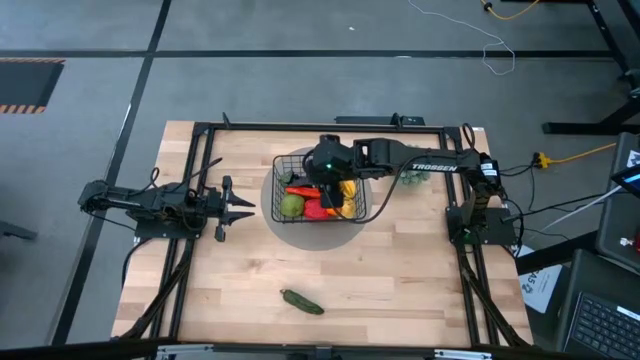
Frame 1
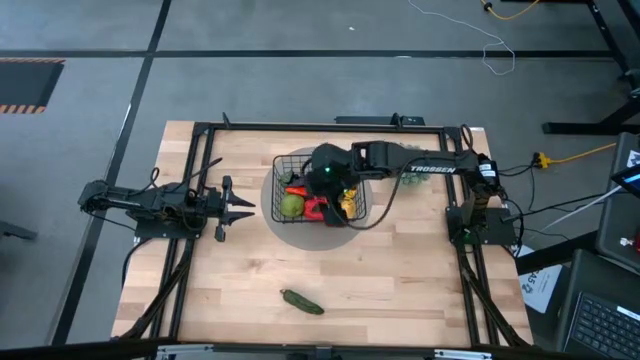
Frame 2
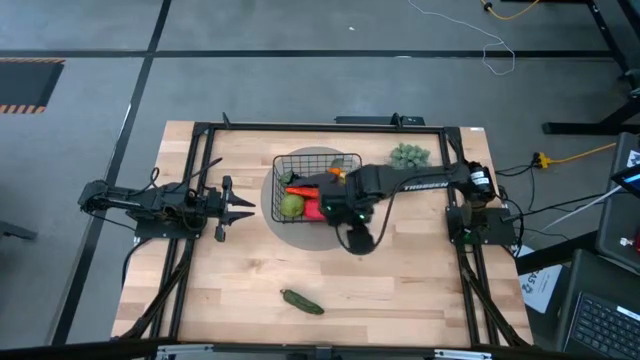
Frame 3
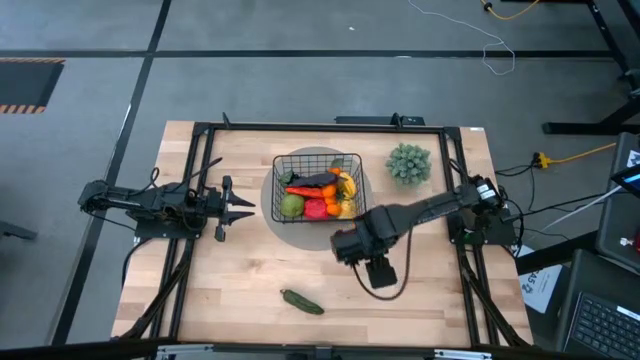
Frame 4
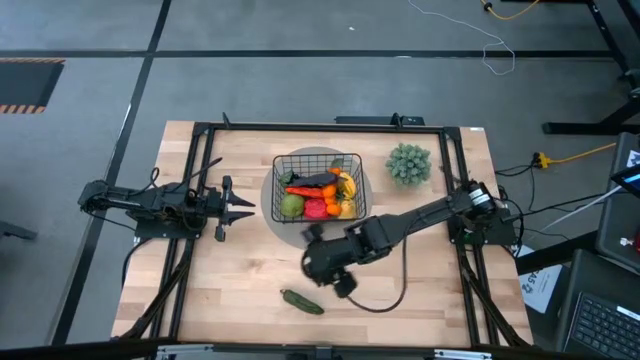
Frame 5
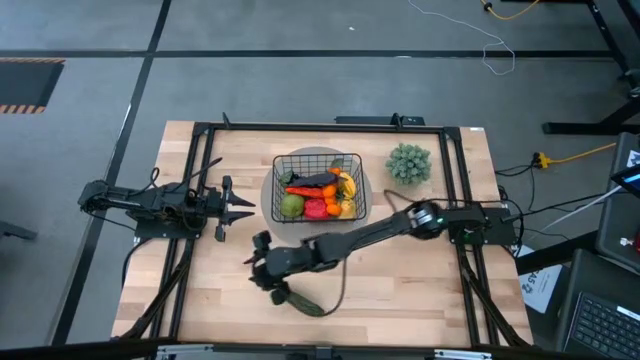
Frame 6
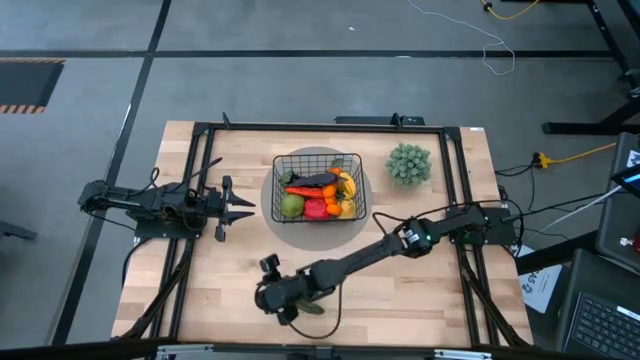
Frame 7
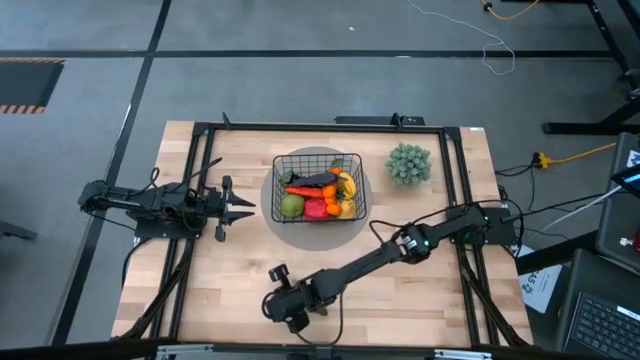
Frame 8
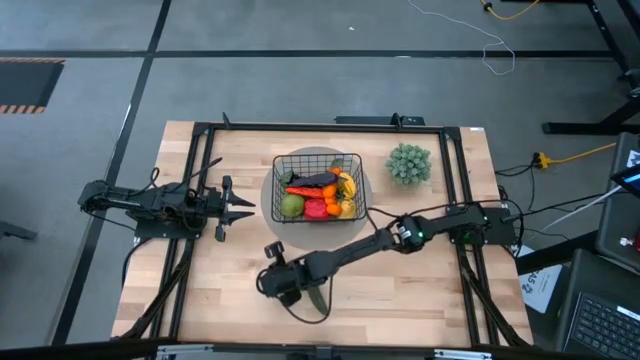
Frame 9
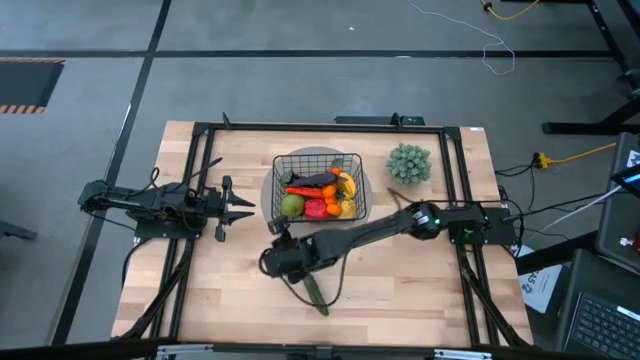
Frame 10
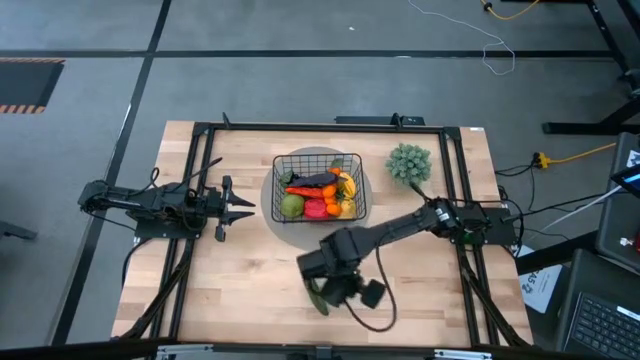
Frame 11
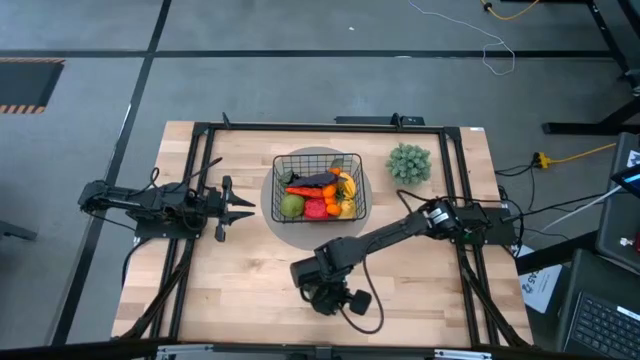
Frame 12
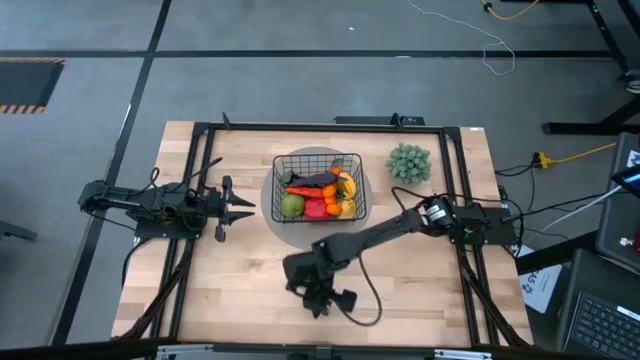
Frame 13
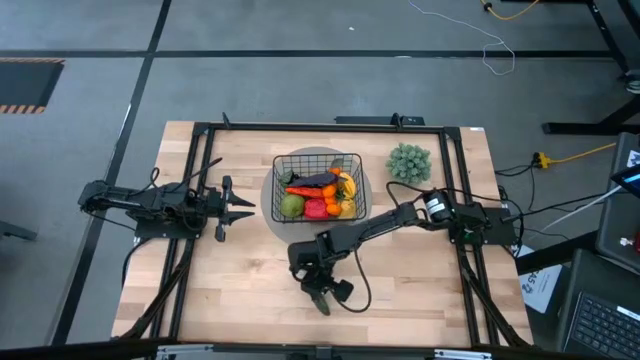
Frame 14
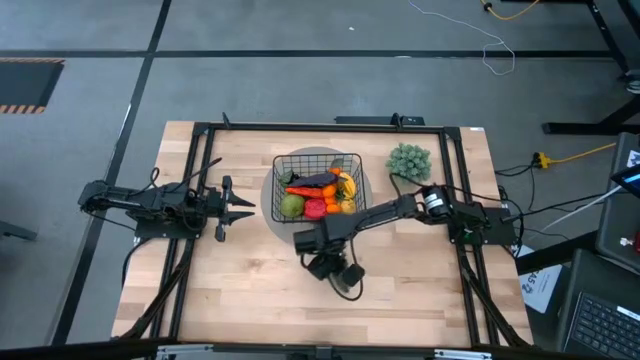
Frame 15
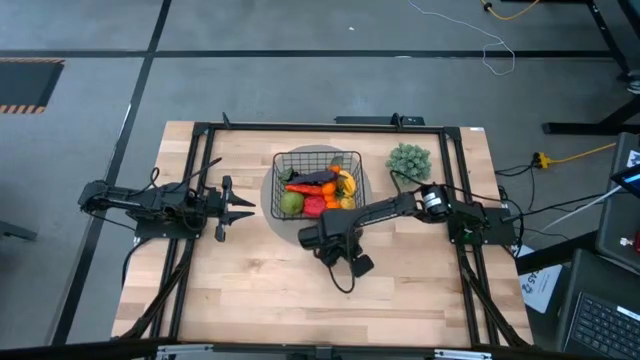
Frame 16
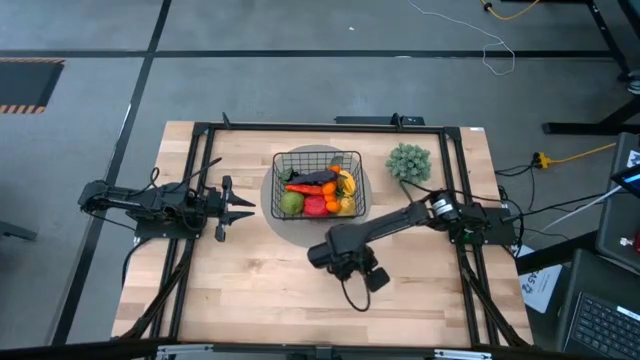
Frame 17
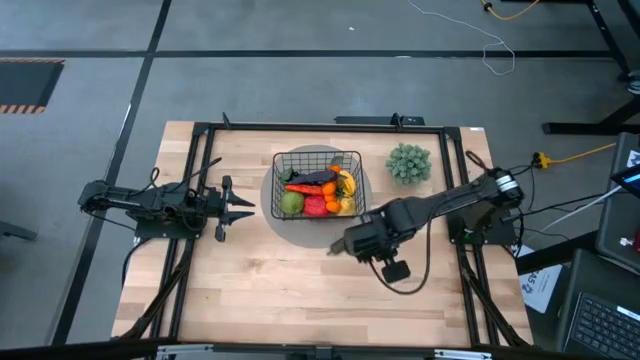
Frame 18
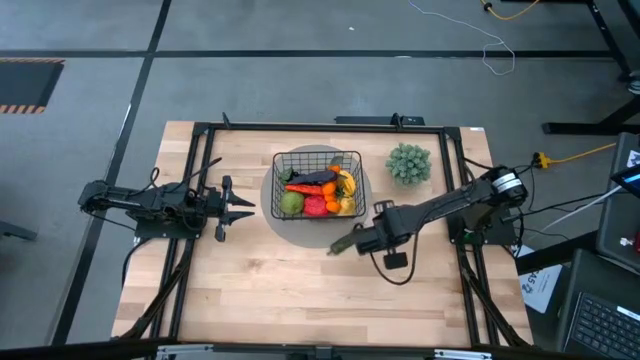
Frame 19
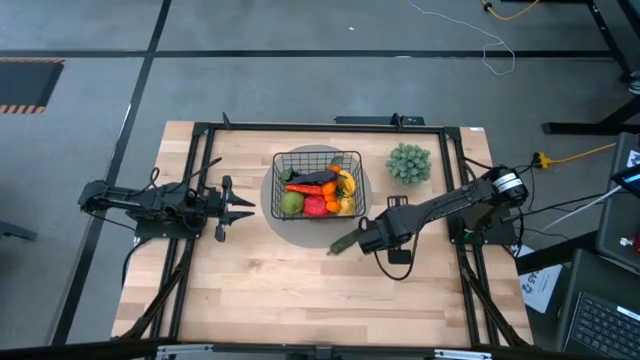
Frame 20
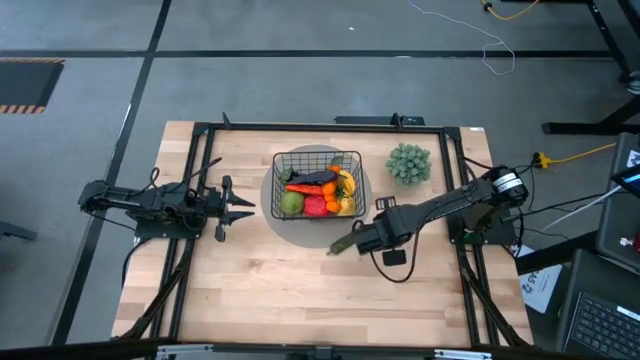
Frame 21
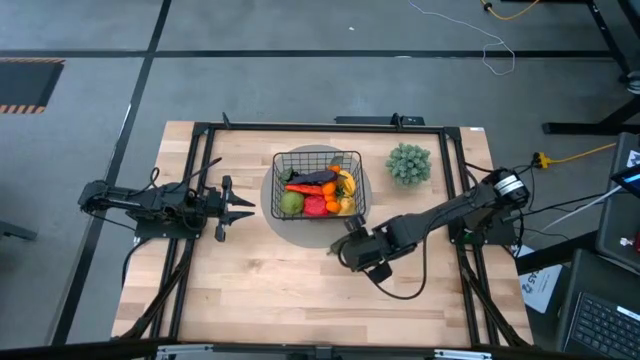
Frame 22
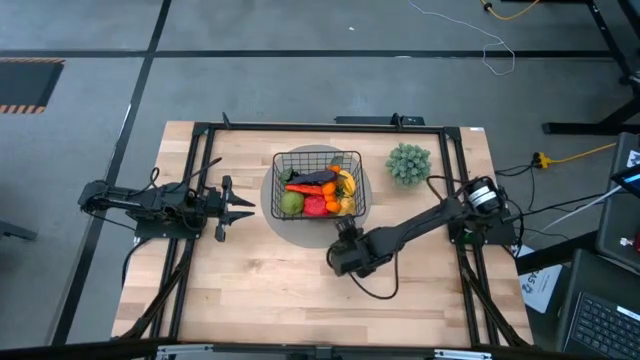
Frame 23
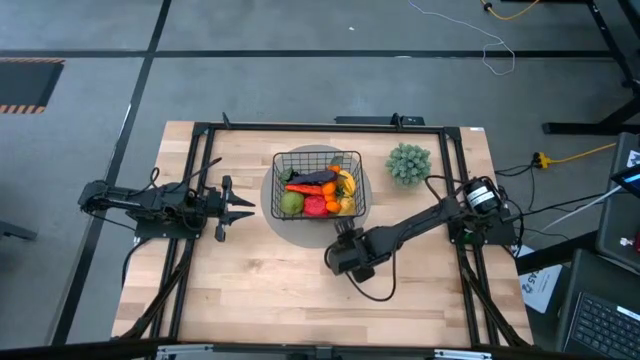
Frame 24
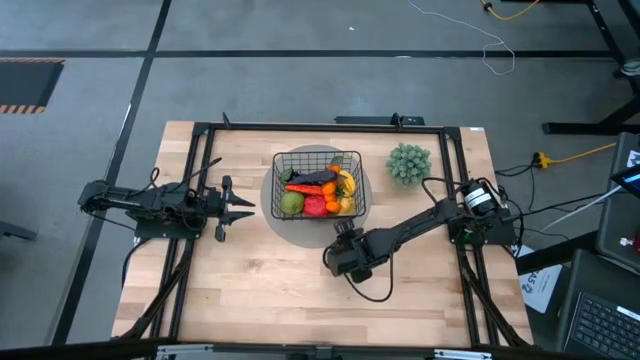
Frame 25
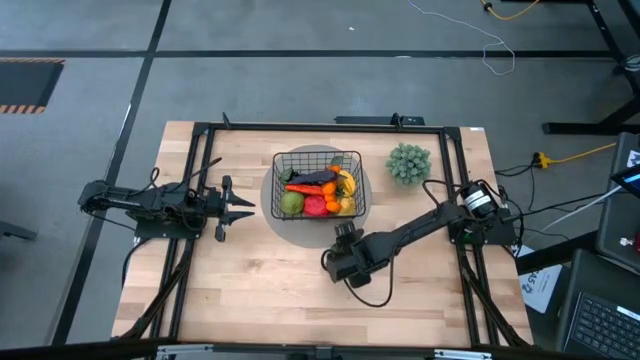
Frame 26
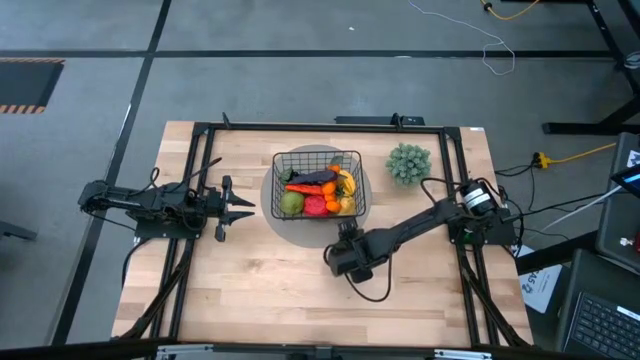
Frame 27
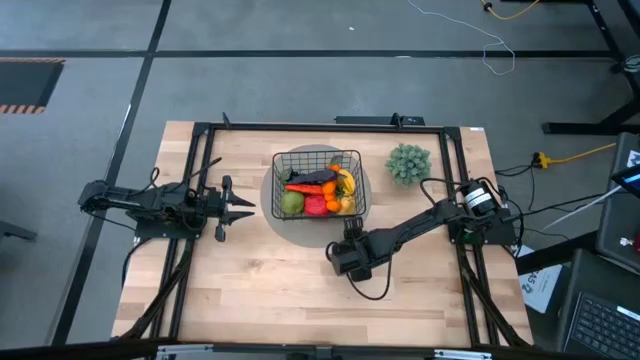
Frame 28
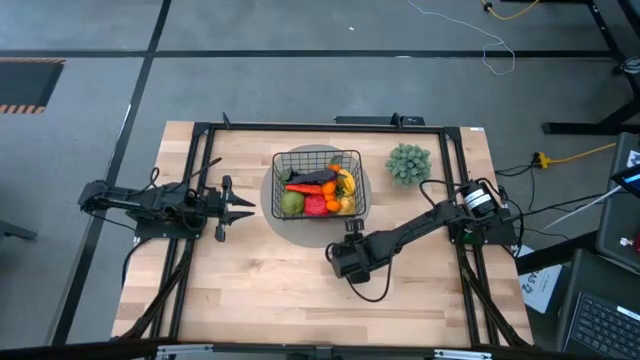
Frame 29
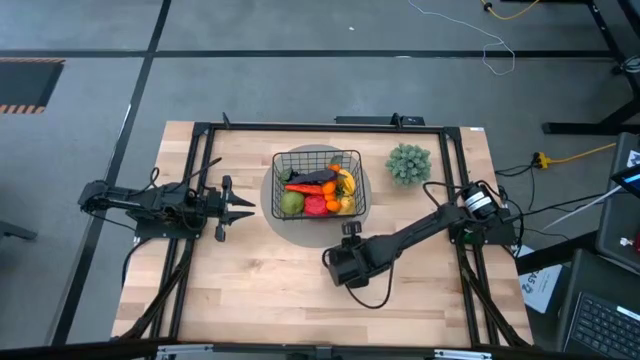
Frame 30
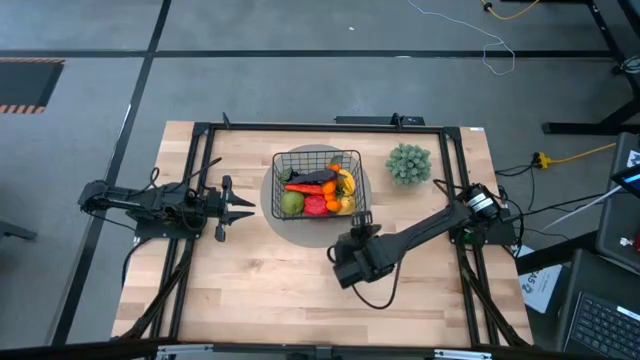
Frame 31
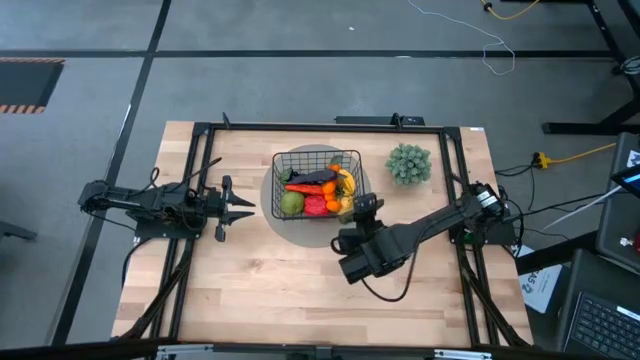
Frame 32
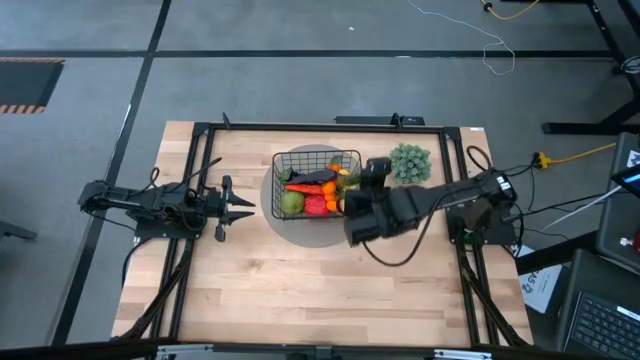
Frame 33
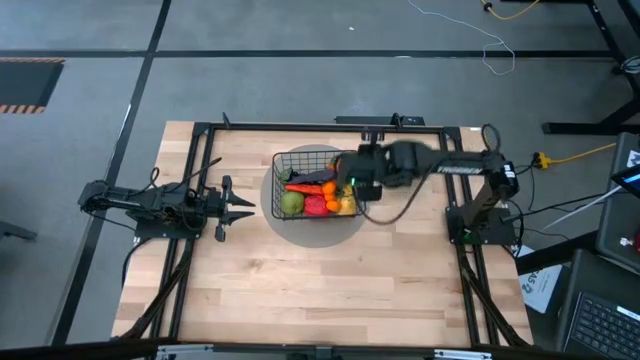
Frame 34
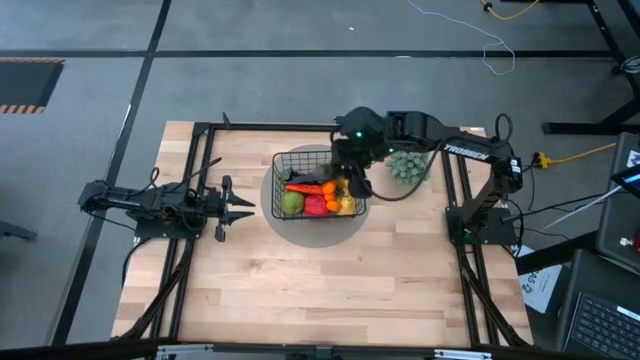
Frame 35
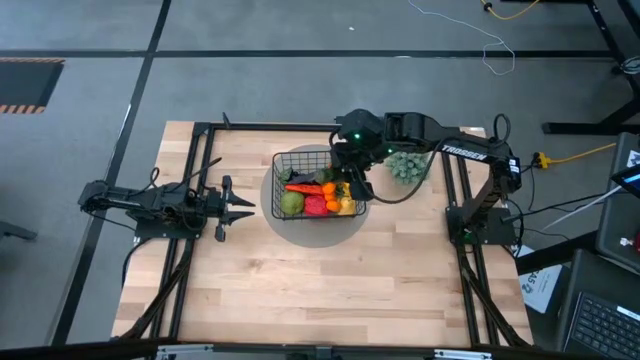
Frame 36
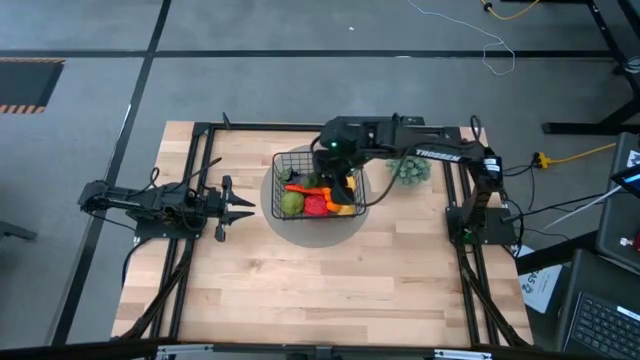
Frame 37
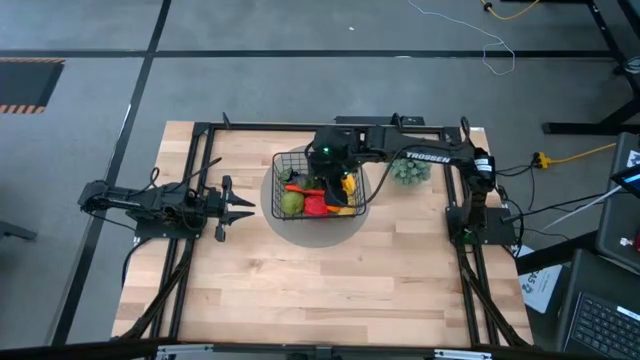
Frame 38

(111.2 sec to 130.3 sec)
Task: Build produce basket
Put the green chili pepper into the black wire basket
